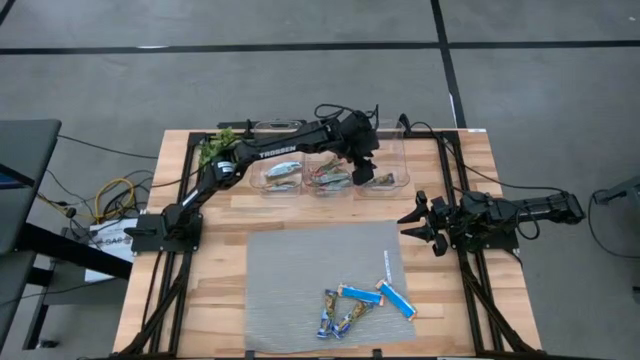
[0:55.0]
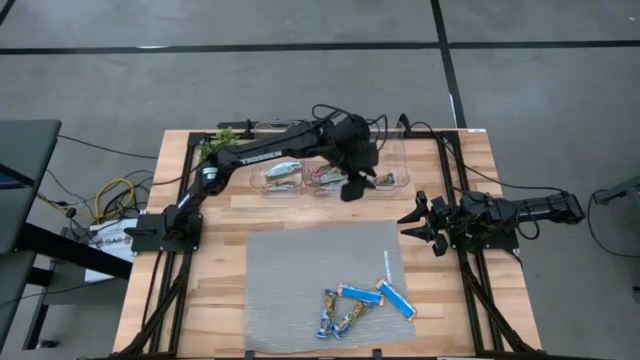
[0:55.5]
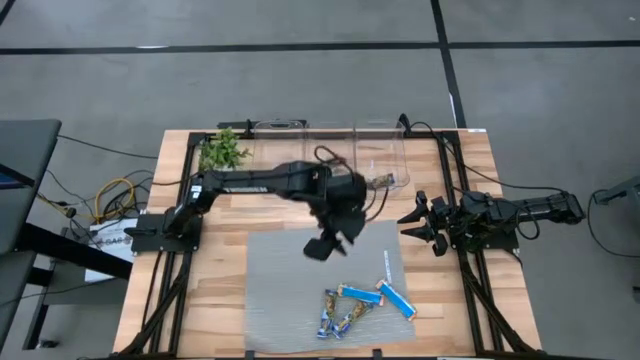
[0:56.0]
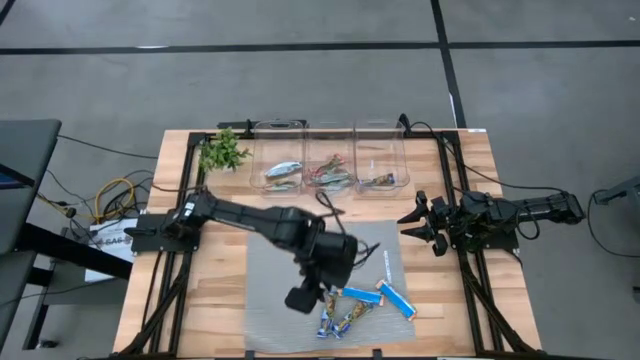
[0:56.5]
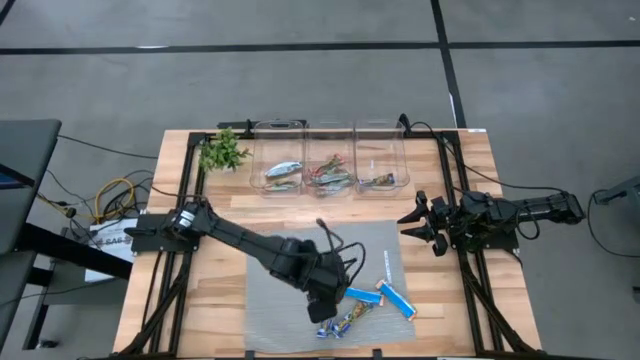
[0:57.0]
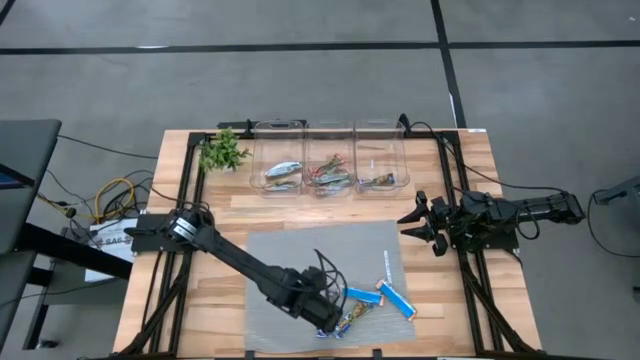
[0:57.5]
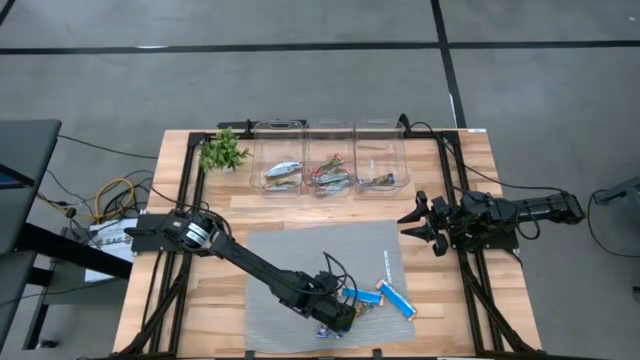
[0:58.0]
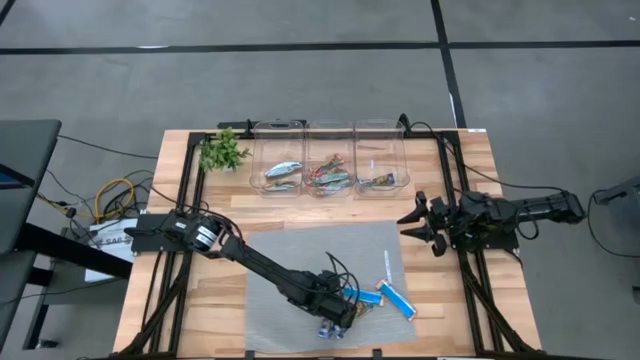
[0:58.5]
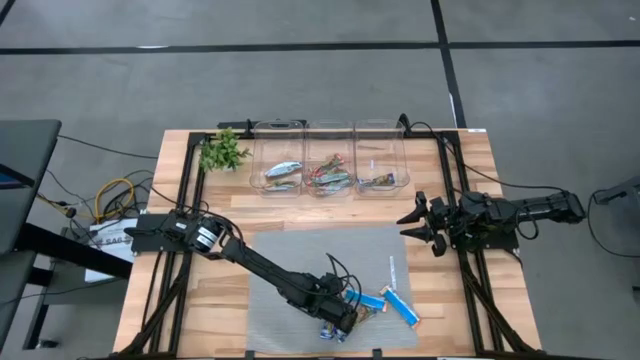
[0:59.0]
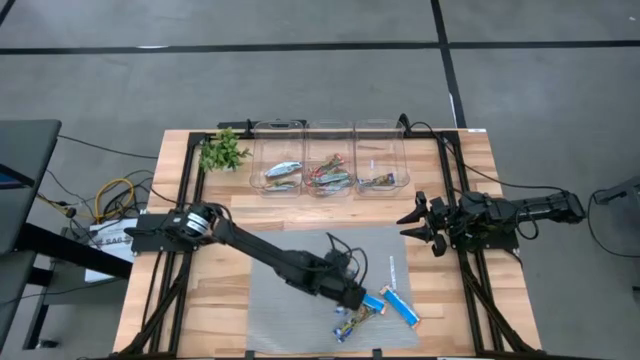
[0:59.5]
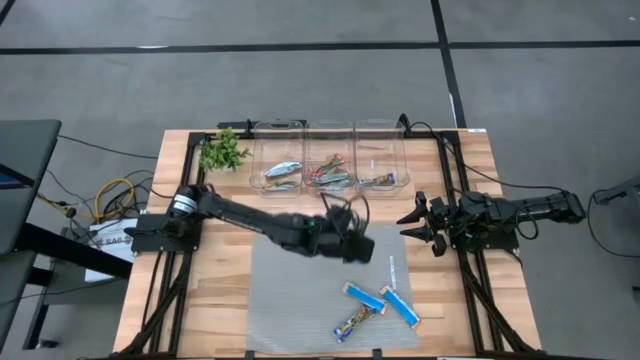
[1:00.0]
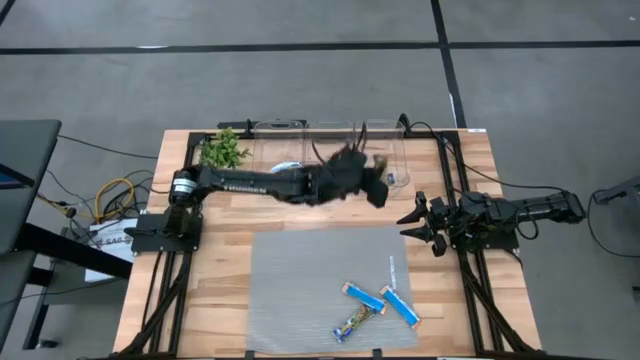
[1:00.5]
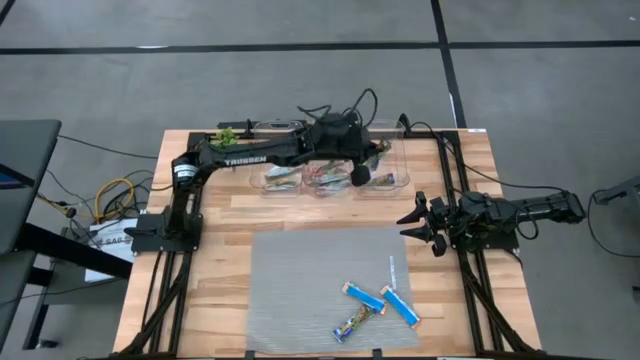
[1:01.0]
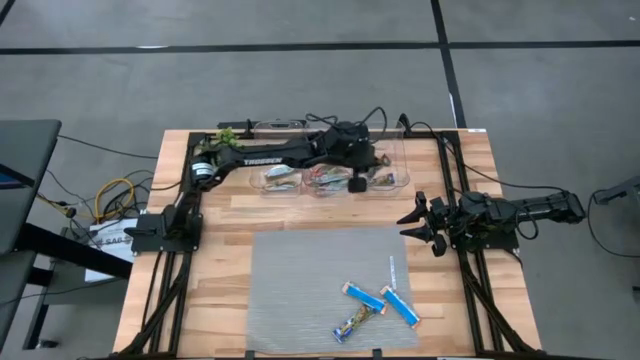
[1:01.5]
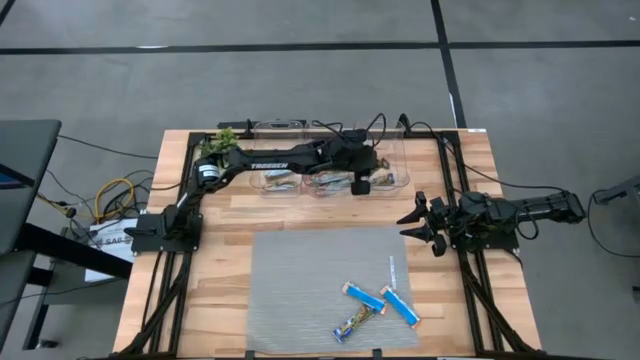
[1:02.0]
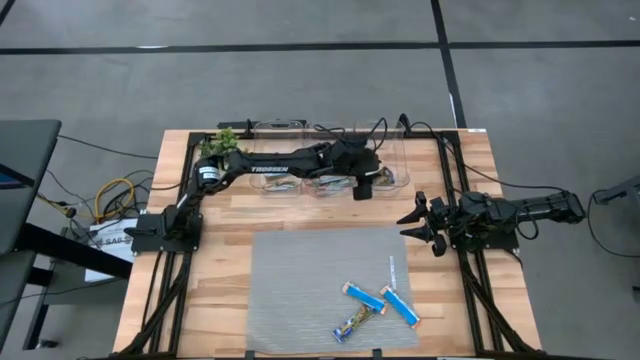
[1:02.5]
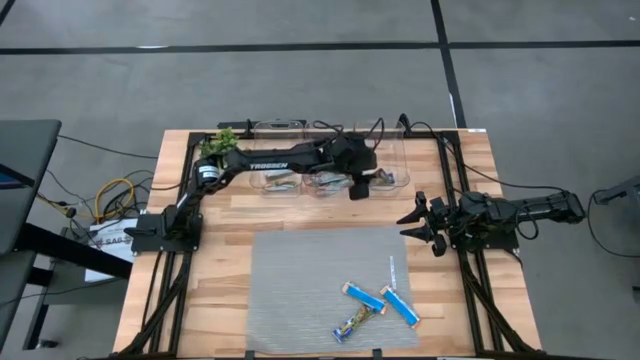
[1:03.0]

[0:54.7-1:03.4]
Task: Pick and place Granola Bars by type
Put the purple granola bar into the right transparent bin

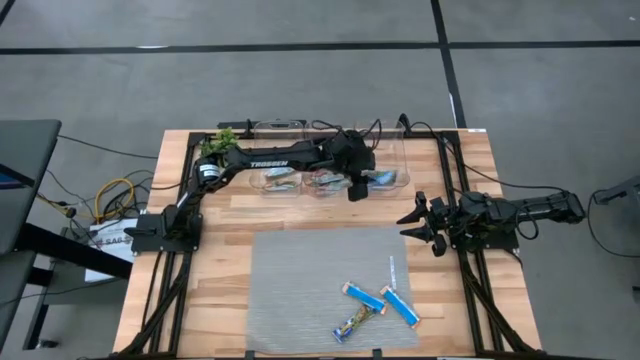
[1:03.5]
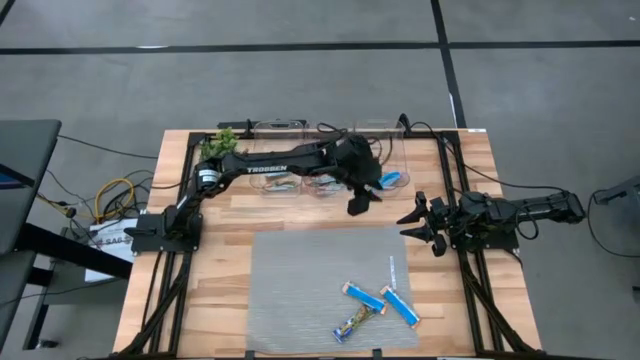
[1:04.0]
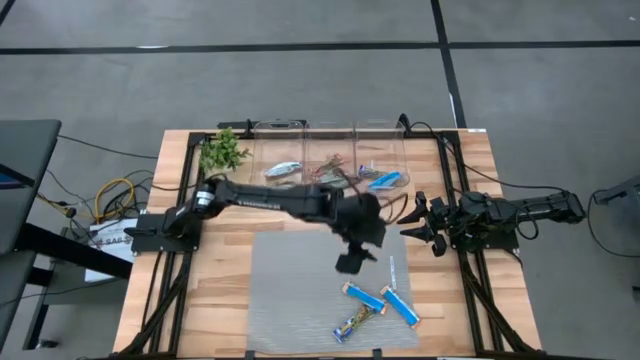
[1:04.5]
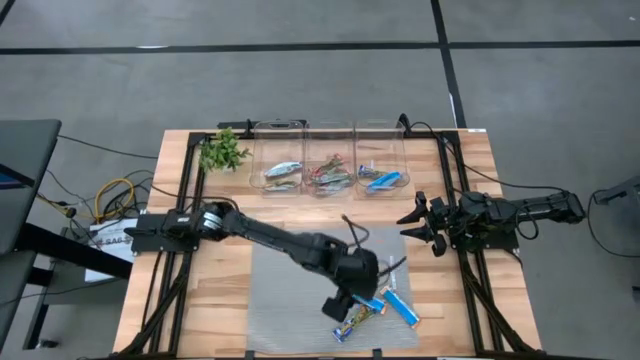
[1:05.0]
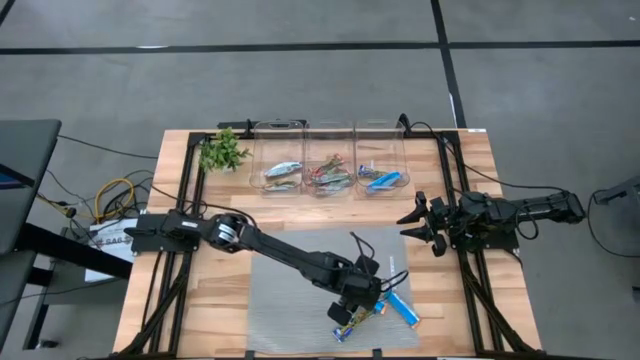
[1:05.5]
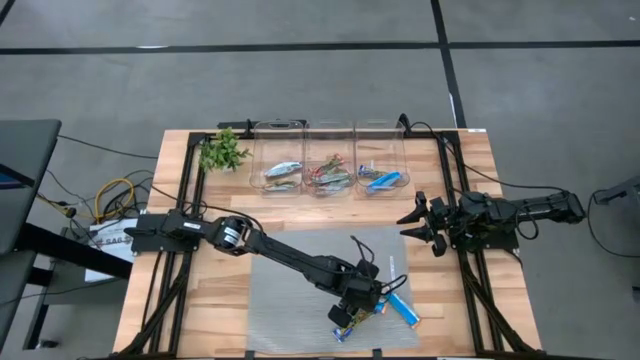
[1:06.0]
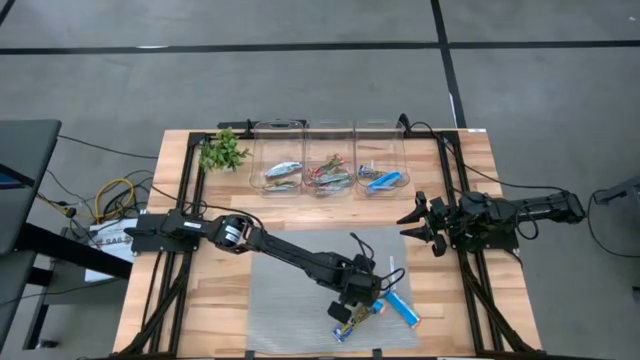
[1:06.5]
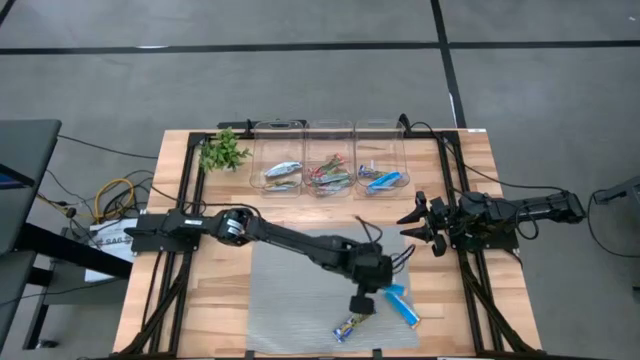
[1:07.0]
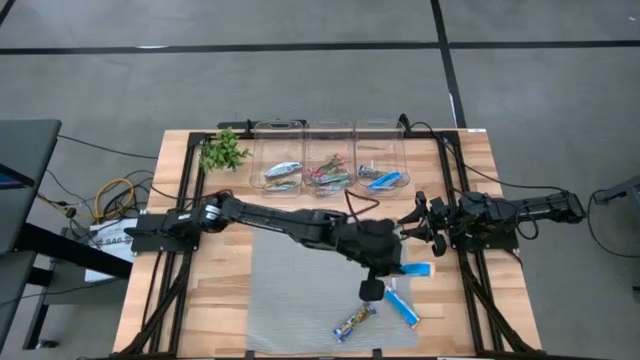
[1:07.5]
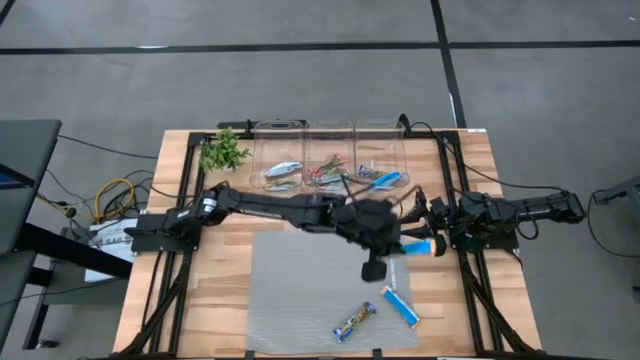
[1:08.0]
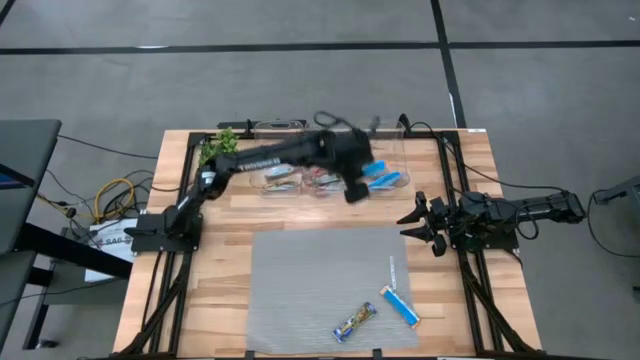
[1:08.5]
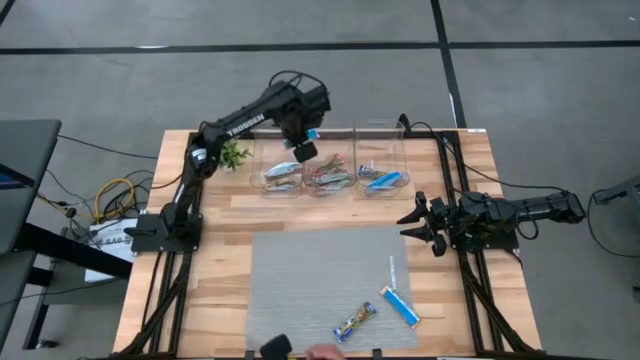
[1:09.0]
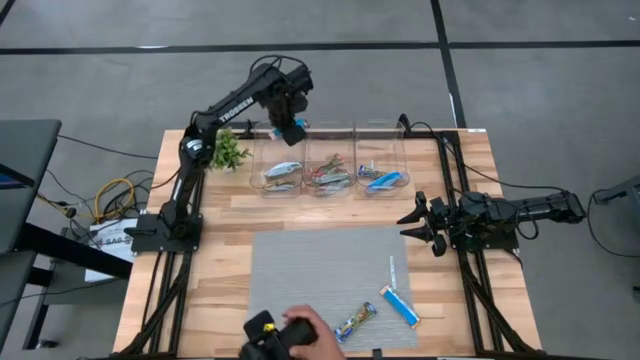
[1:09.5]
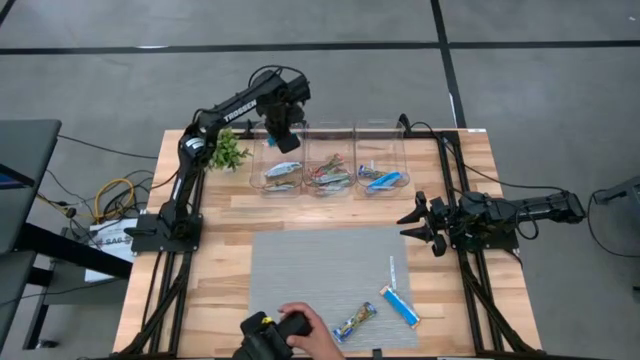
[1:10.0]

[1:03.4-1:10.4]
Put the yellow granola bar into the left transparent bin

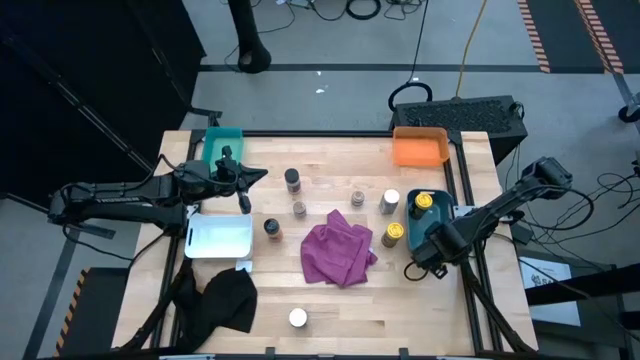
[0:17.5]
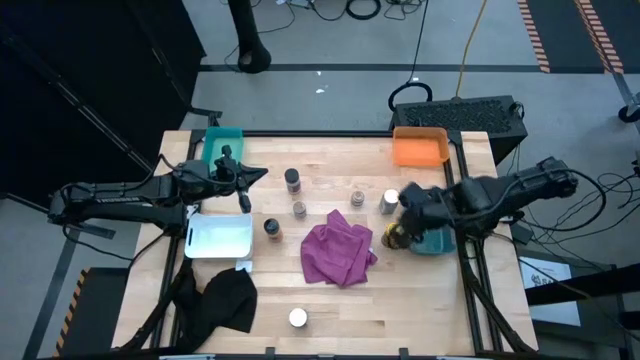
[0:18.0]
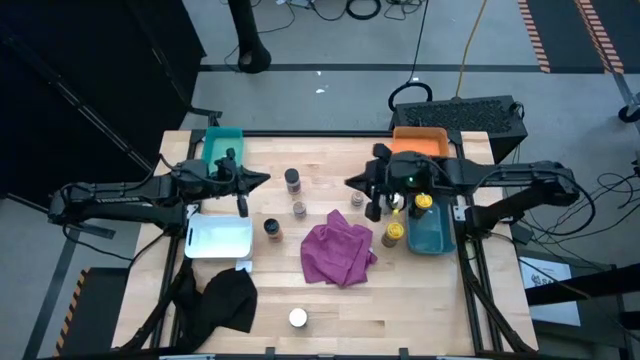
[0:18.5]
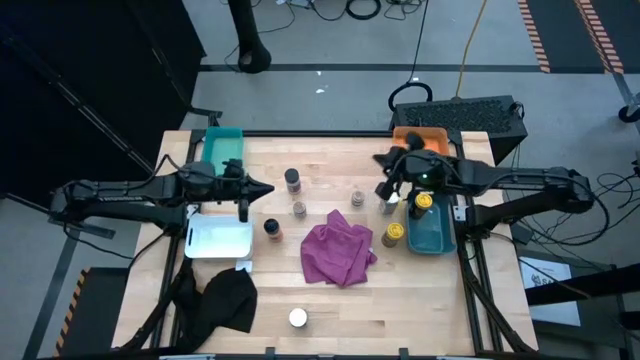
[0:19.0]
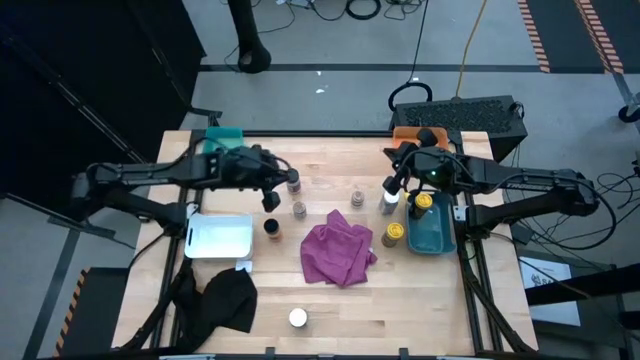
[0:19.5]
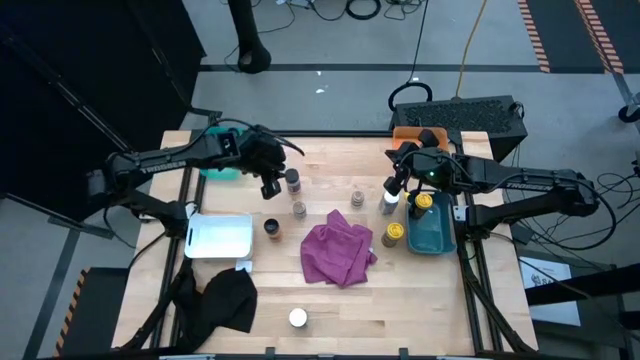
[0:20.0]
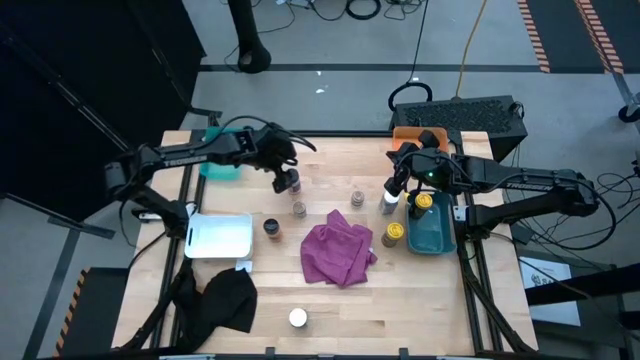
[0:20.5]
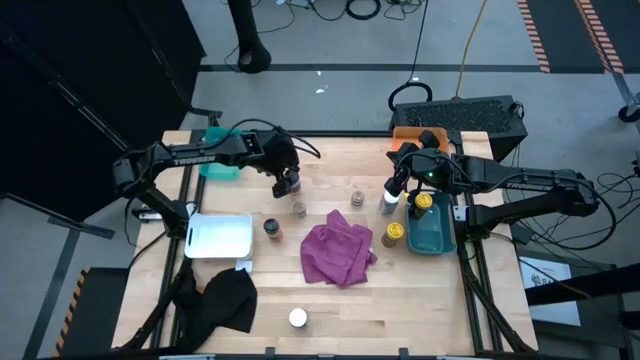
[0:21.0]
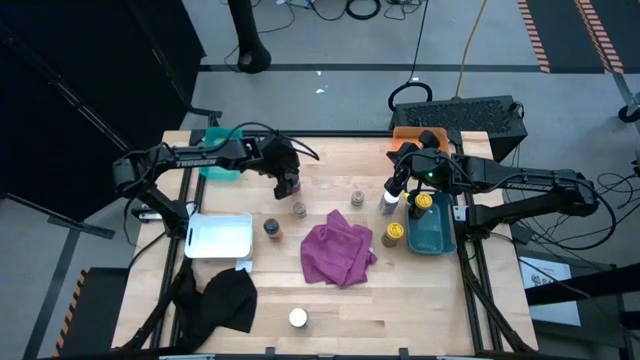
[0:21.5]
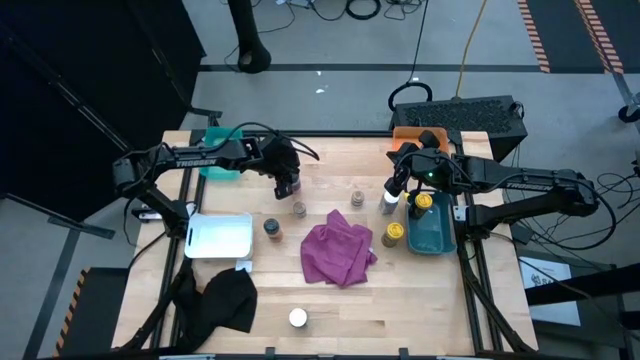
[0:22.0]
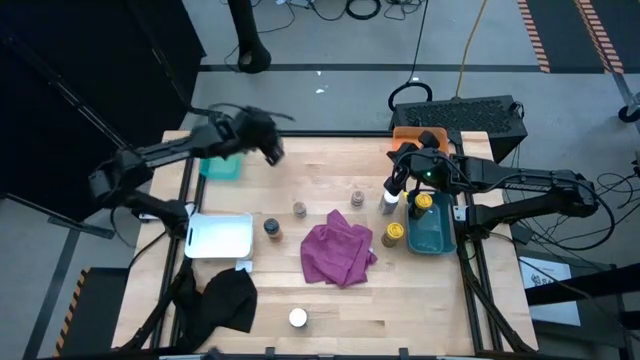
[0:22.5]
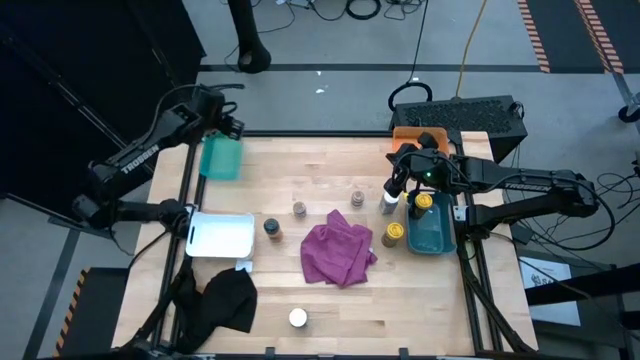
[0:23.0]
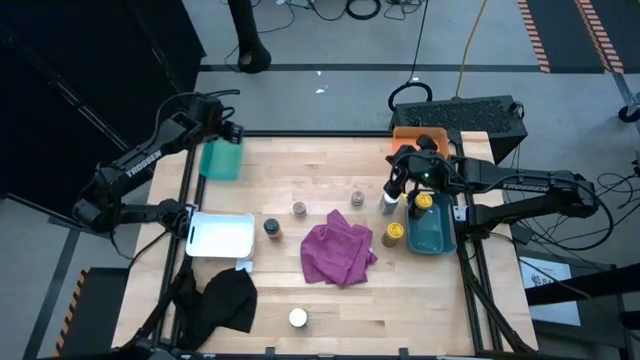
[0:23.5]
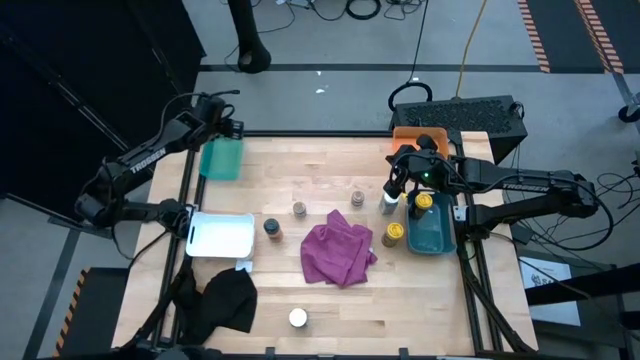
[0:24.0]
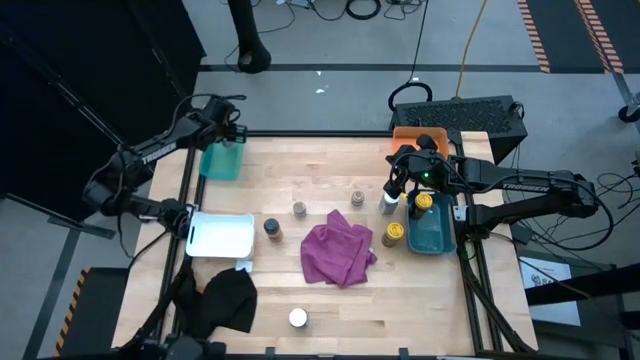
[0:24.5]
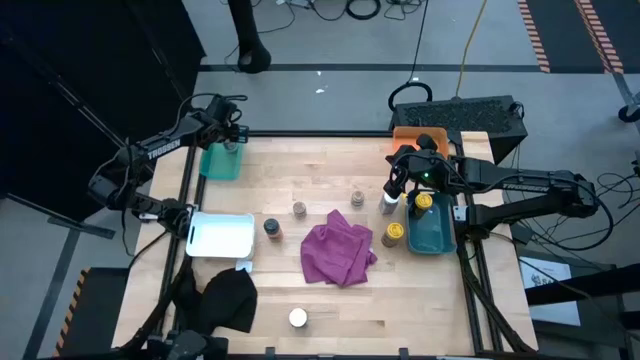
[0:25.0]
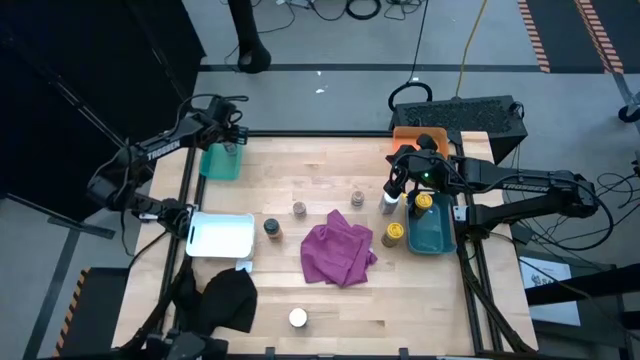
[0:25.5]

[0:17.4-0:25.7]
Task: Sort spices by type
Put the top black seasoning bottle into the blue bin
